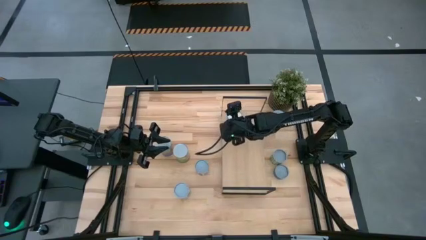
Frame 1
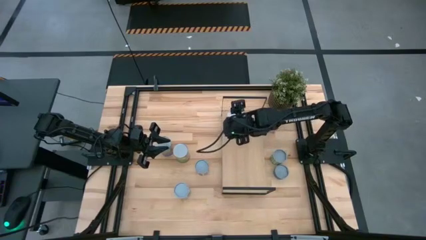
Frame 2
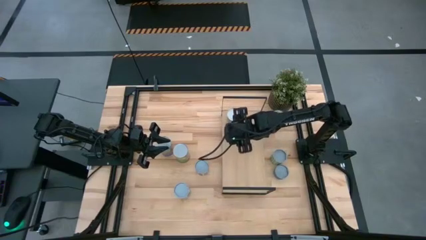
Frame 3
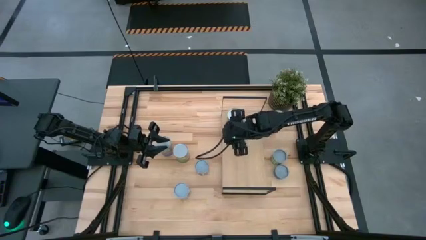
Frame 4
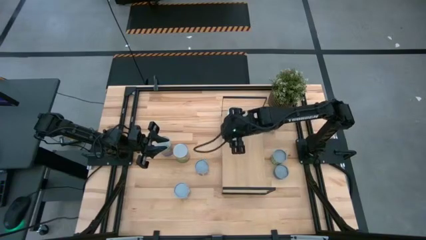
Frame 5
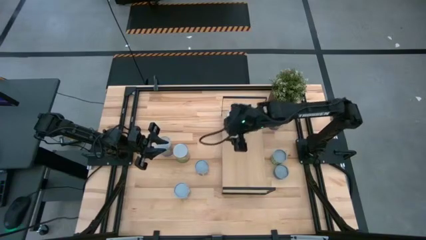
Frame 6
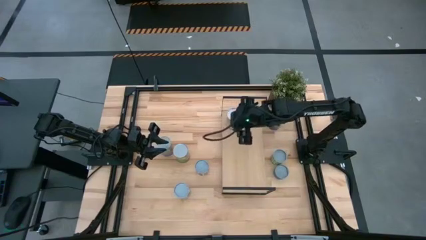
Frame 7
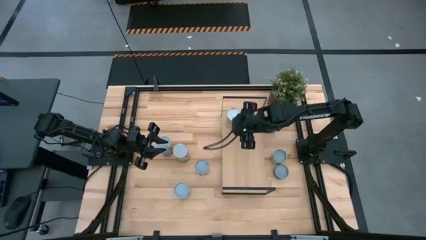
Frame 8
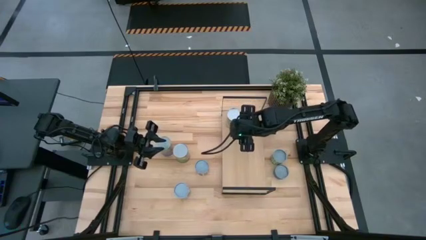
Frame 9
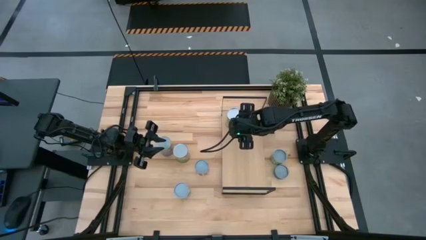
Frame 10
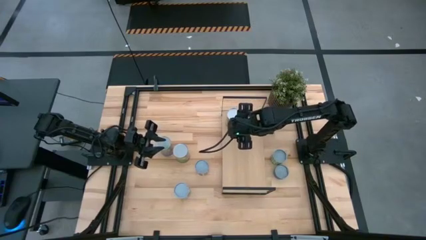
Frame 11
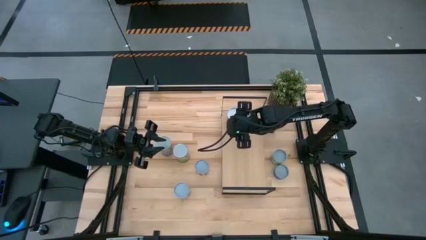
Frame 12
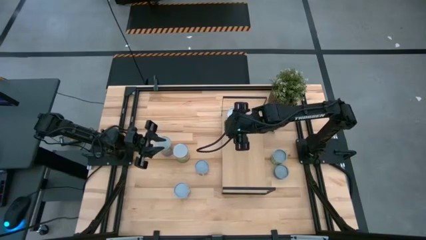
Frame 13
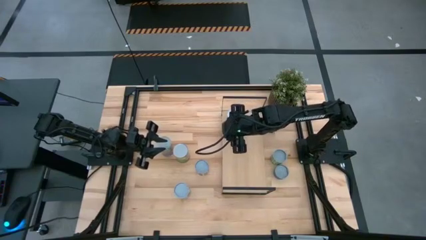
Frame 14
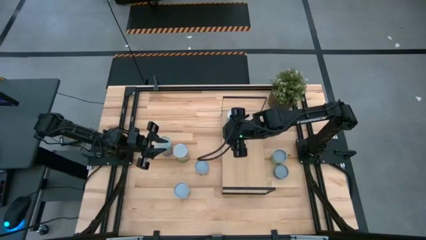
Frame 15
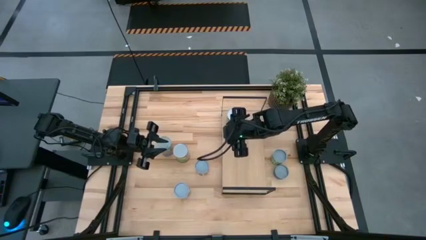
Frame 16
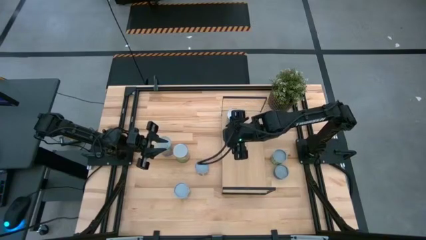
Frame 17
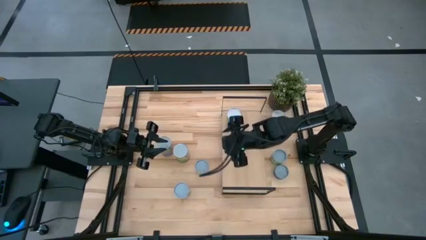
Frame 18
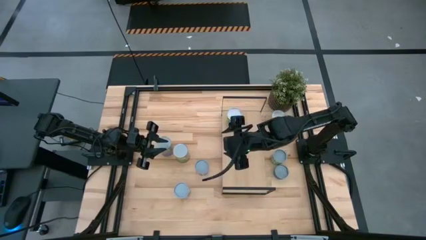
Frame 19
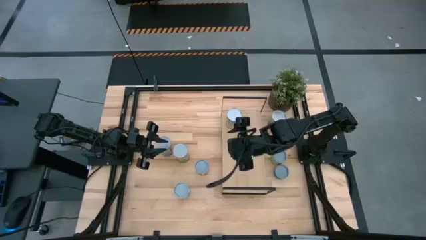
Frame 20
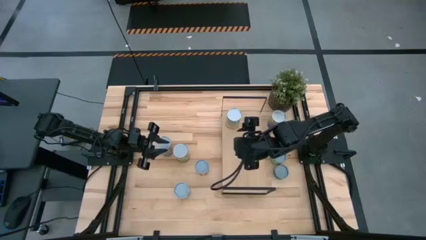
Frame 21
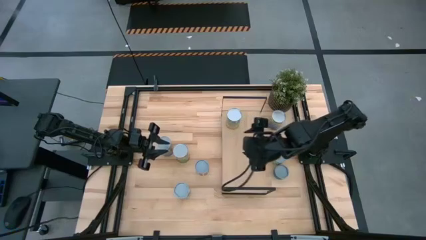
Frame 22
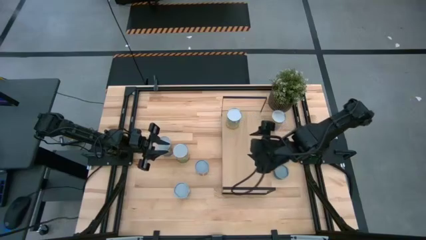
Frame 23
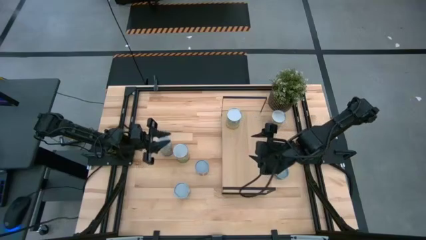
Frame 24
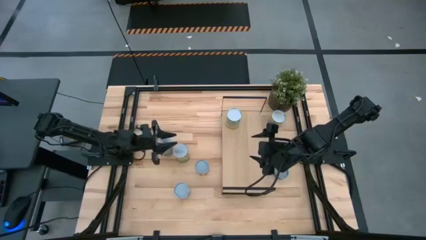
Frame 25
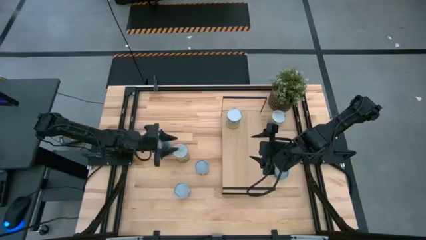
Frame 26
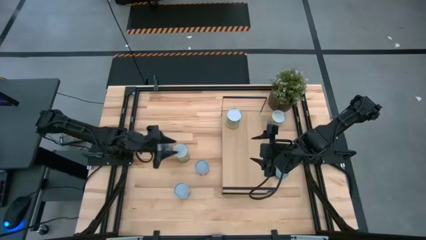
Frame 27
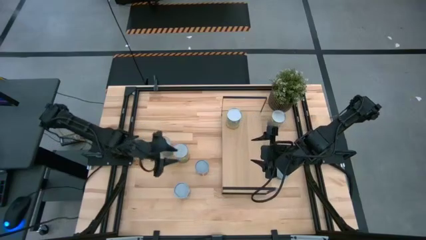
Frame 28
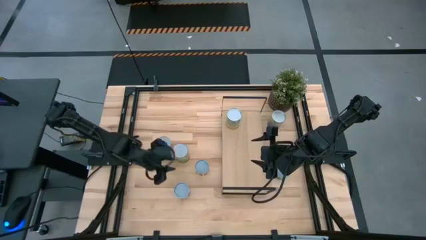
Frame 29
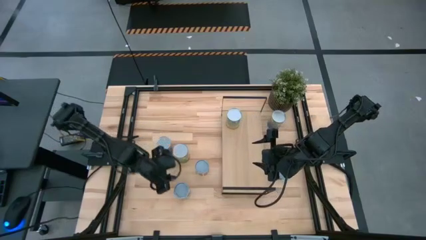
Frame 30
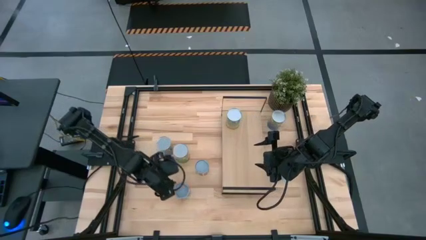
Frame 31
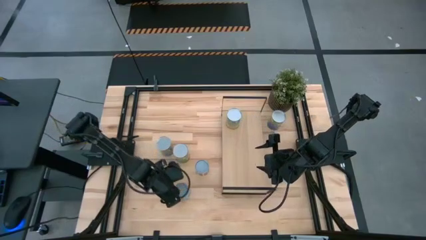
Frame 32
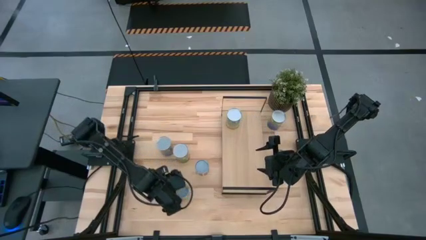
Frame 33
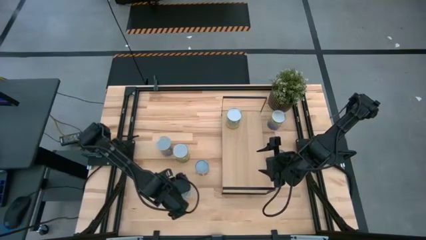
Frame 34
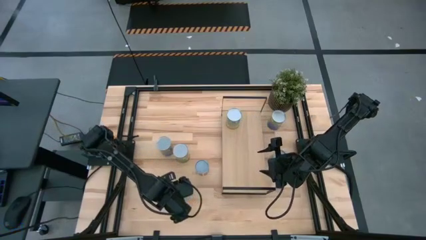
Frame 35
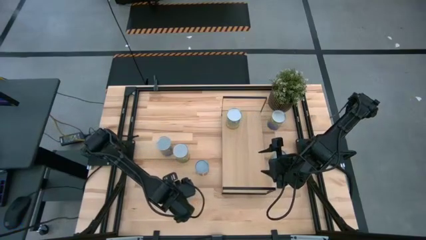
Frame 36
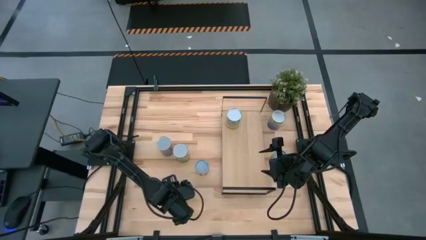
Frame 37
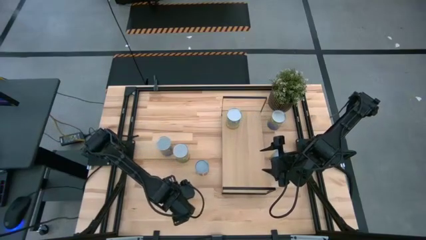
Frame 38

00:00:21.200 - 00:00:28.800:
Task: Pick and place cans onto a shelf
Adjust the canned mixed fruits

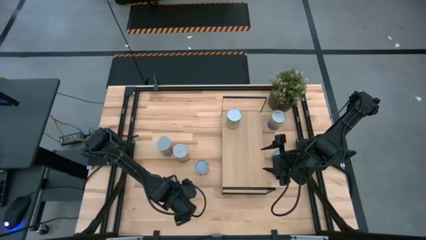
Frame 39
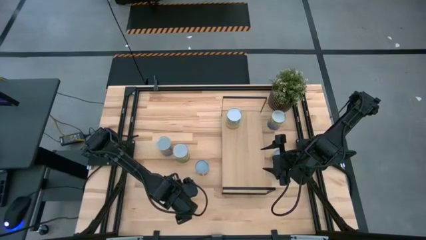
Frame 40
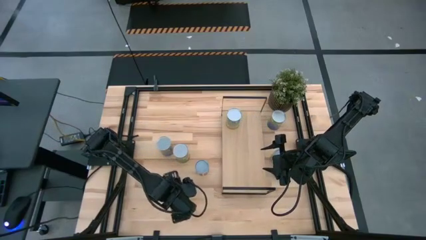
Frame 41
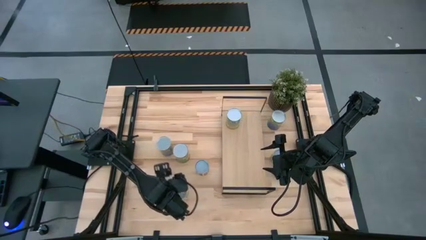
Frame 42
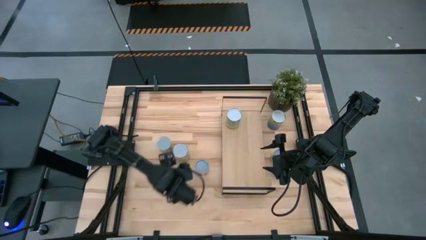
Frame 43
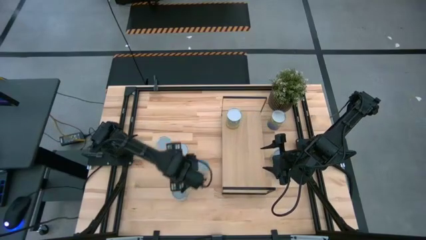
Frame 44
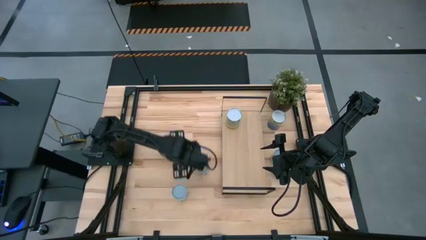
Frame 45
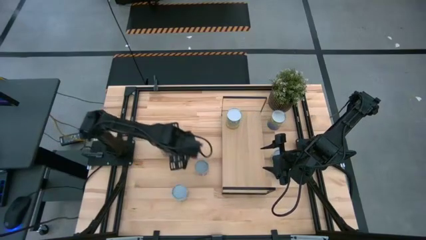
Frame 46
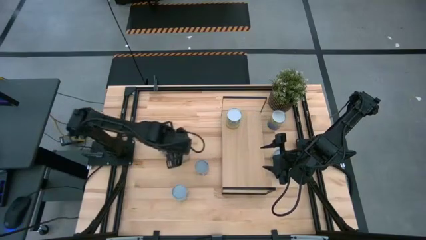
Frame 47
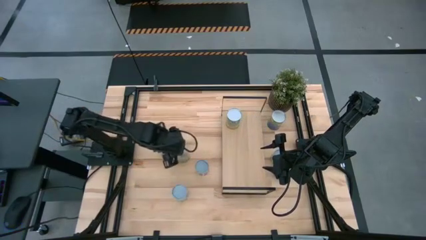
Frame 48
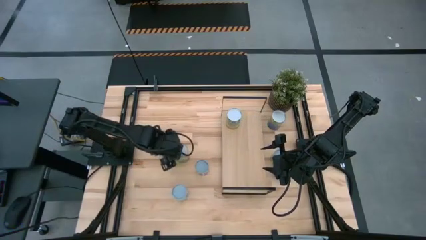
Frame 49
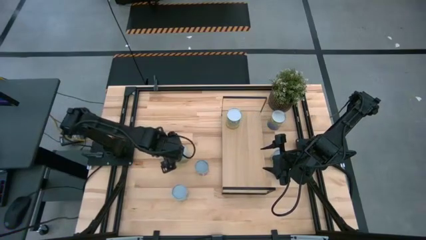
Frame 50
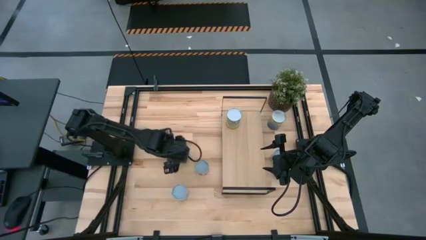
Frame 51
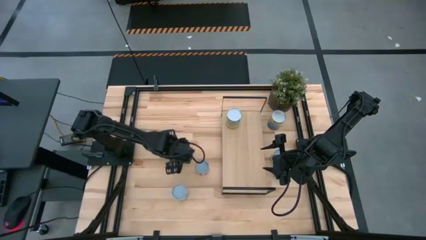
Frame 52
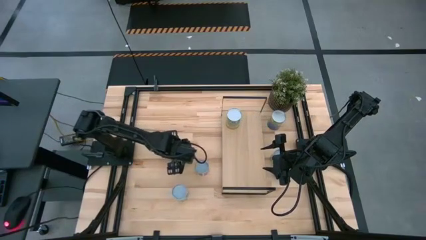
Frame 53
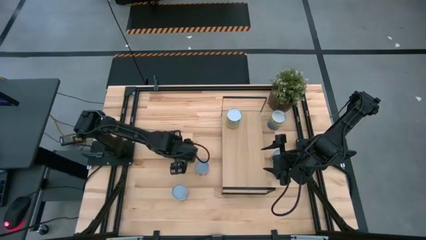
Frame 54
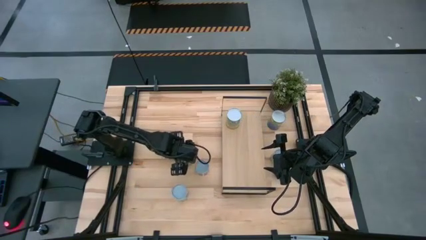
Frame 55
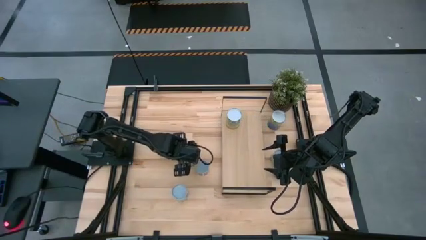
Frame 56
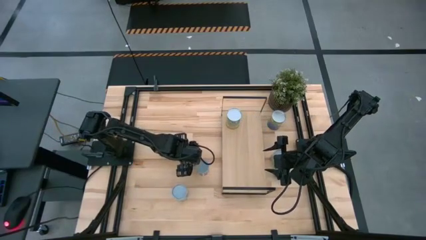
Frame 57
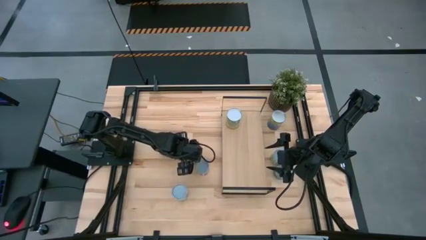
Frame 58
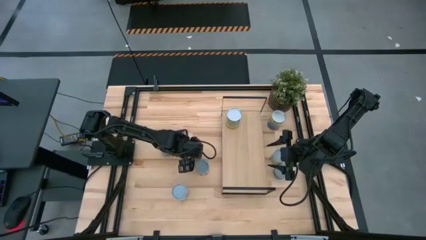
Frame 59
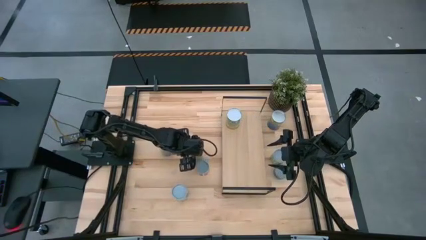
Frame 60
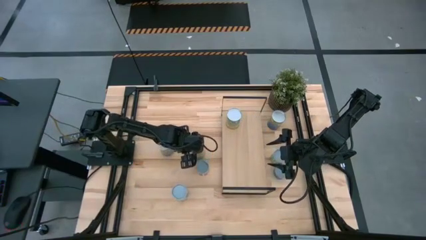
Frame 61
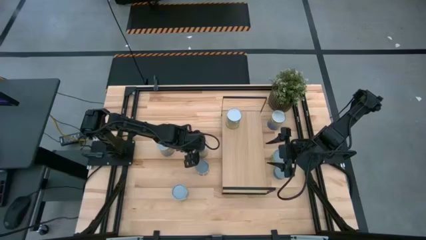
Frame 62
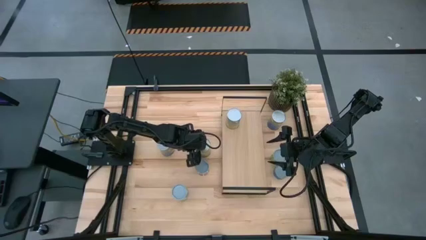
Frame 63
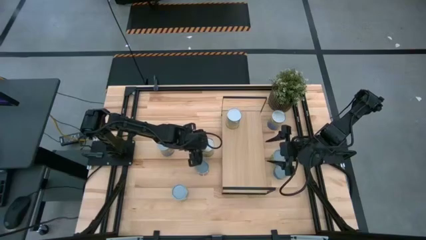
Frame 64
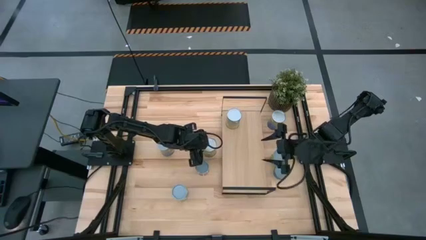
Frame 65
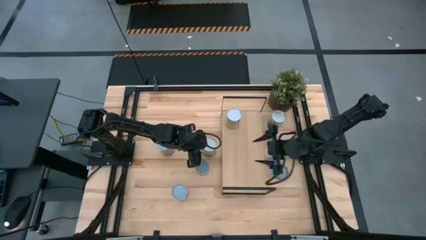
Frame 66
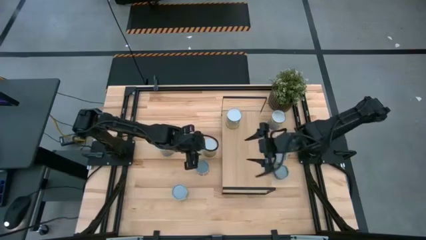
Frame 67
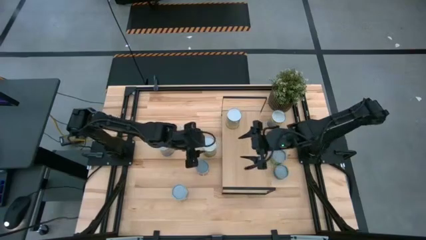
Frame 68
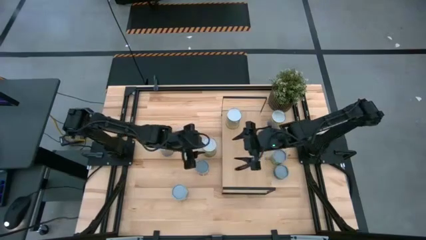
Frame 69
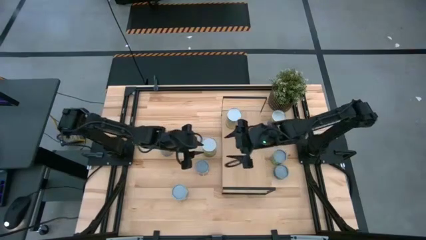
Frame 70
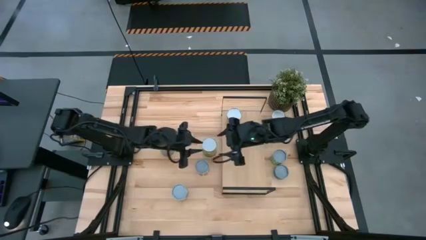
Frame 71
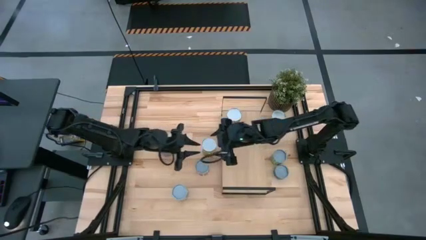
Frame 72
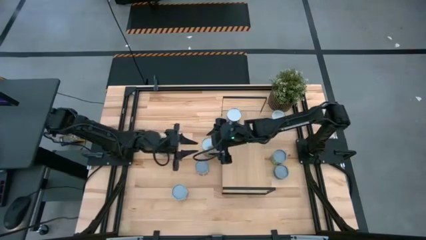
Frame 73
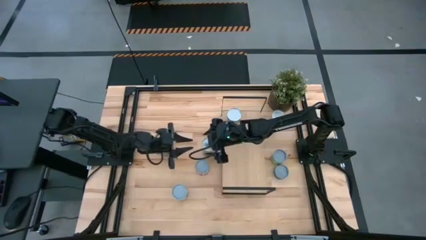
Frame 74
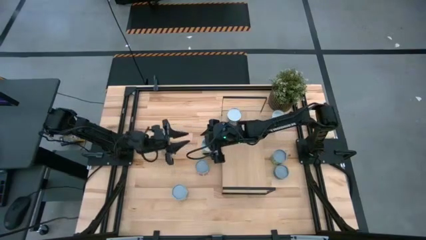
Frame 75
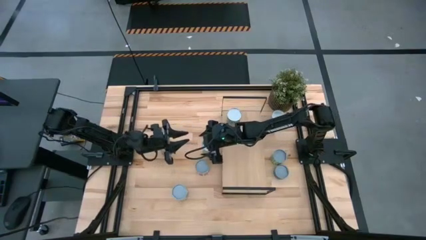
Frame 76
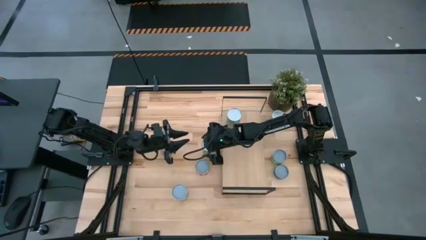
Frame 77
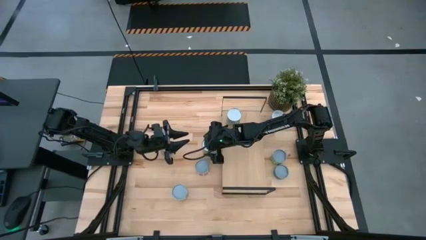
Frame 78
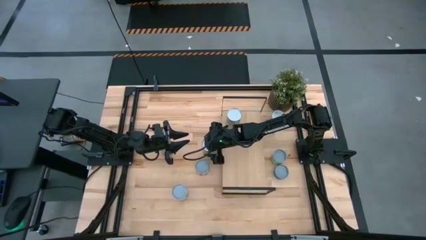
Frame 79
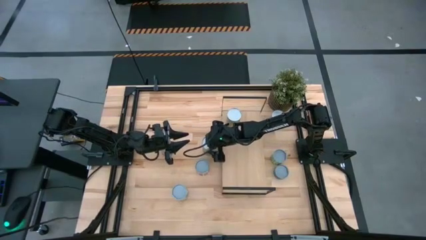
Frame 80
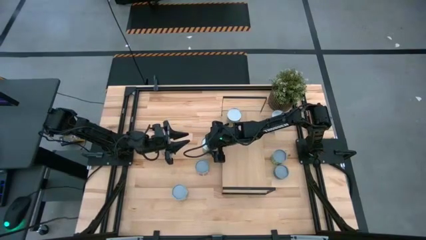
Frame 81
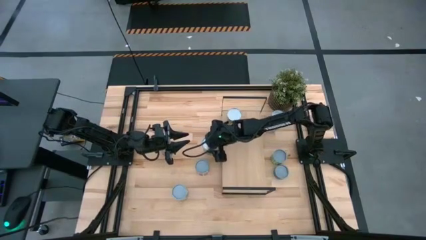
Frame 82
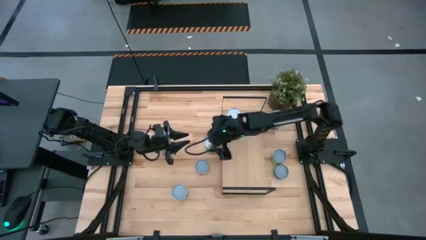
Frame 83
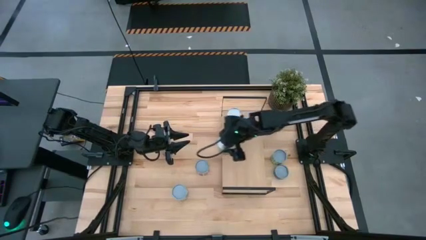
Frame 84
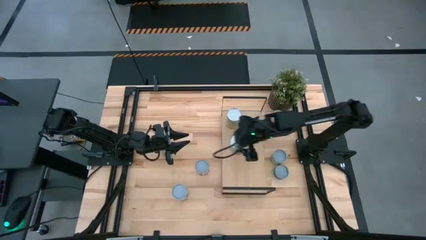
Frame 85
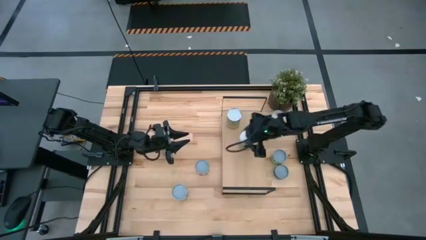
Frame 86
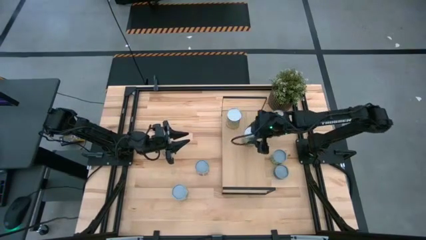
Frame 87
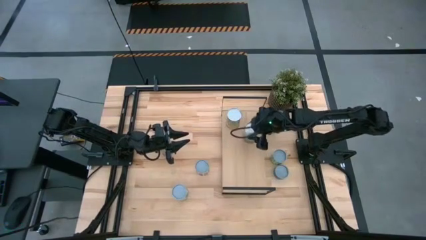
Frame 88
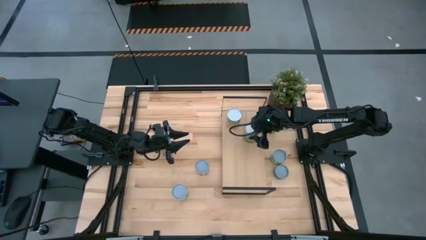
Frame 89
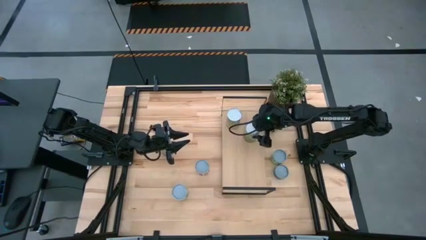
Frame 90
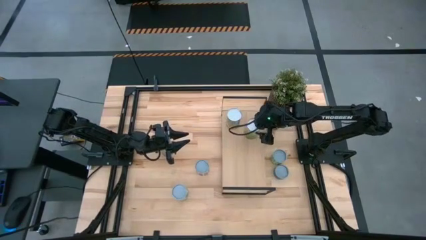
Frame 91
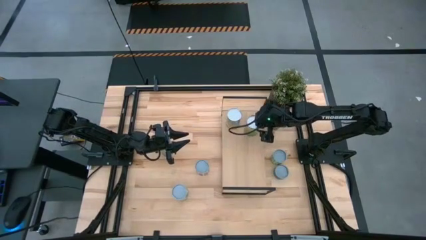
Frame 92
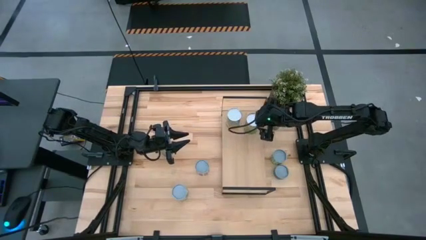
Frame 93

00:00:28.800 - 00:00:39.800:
Put the canned oranges on the shelf
